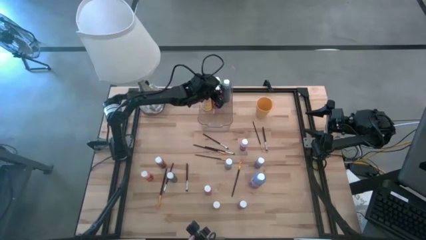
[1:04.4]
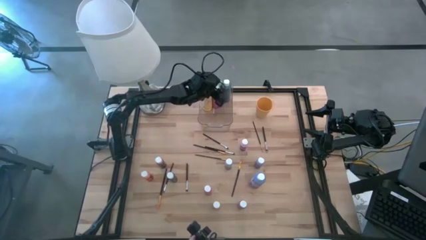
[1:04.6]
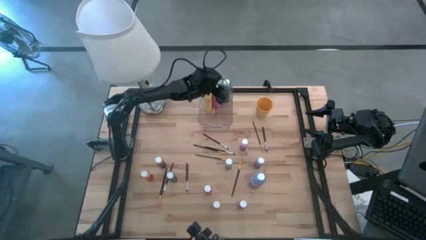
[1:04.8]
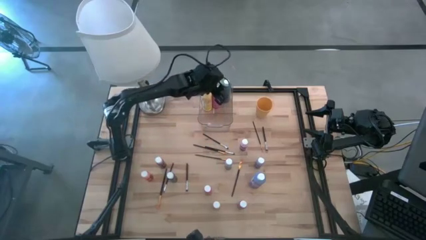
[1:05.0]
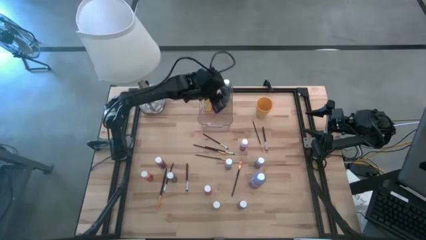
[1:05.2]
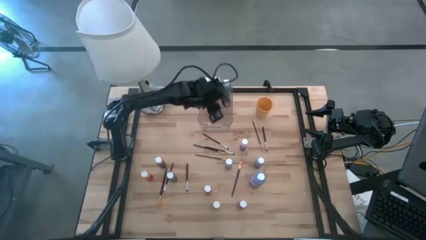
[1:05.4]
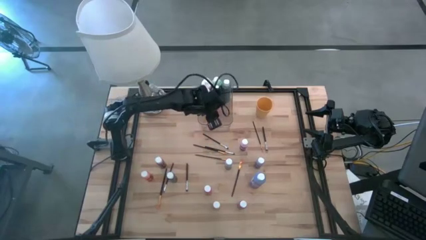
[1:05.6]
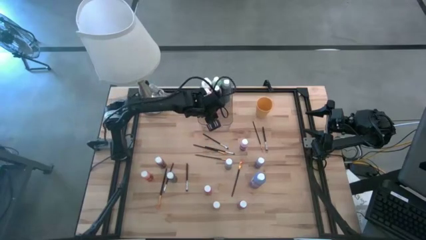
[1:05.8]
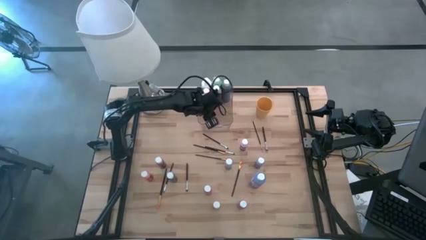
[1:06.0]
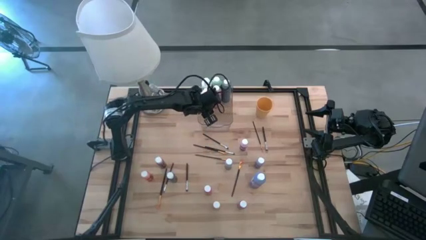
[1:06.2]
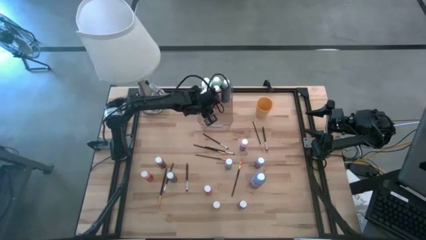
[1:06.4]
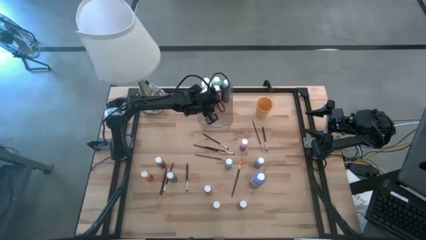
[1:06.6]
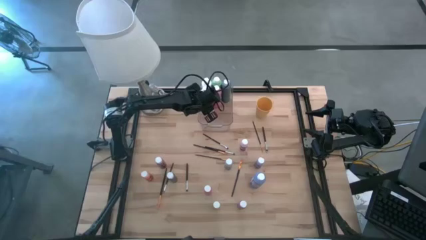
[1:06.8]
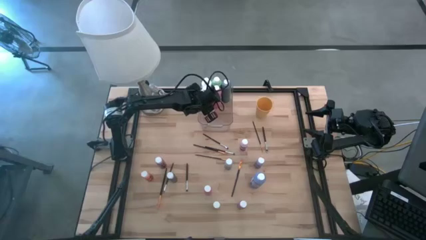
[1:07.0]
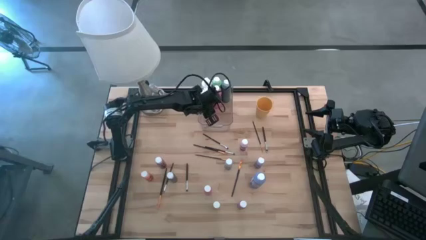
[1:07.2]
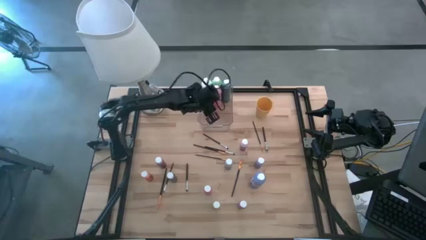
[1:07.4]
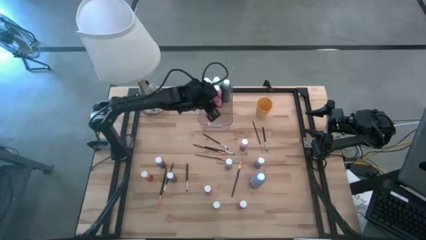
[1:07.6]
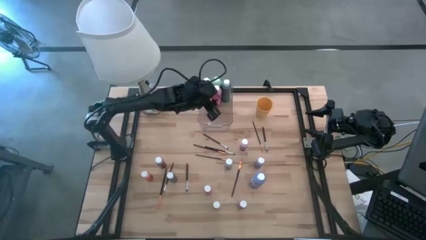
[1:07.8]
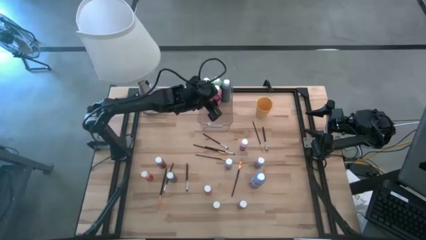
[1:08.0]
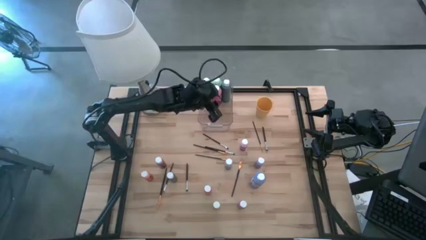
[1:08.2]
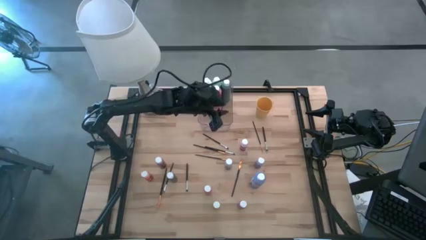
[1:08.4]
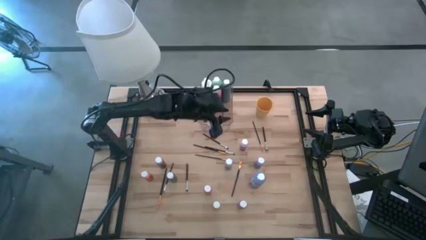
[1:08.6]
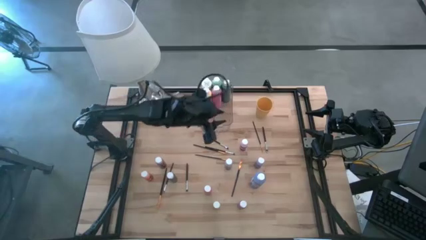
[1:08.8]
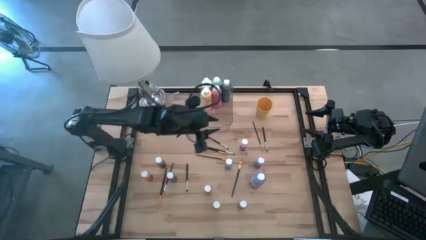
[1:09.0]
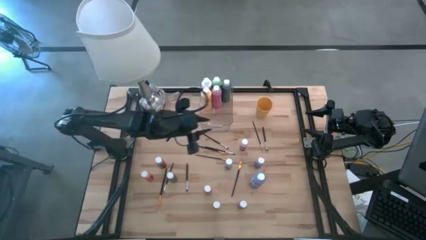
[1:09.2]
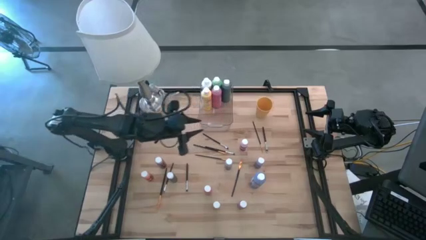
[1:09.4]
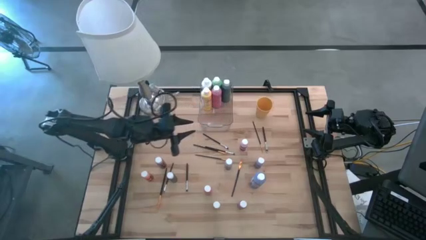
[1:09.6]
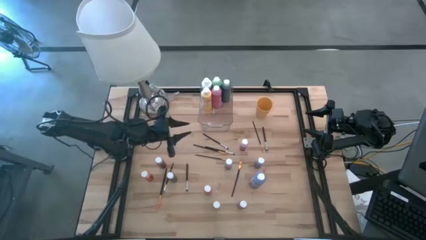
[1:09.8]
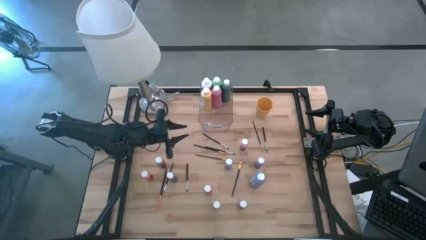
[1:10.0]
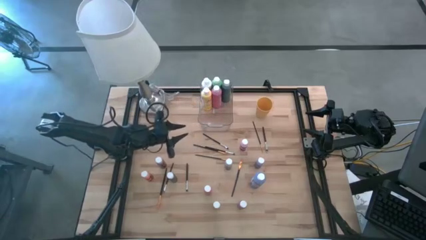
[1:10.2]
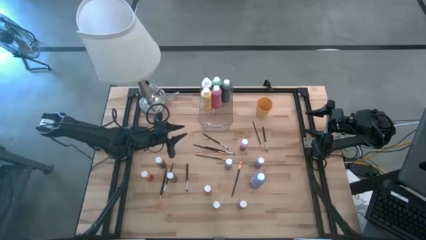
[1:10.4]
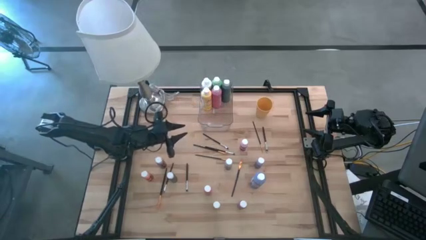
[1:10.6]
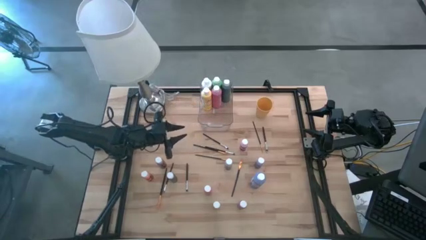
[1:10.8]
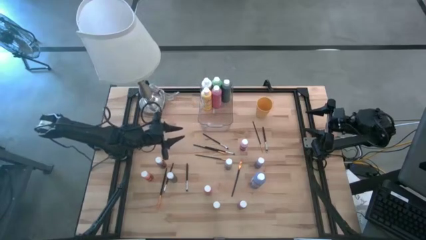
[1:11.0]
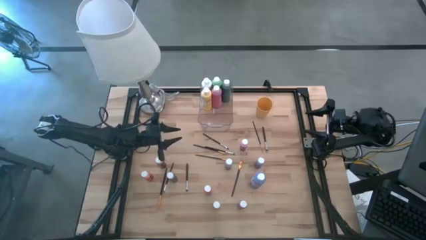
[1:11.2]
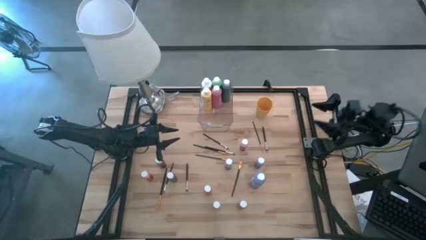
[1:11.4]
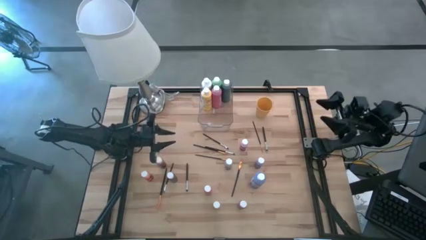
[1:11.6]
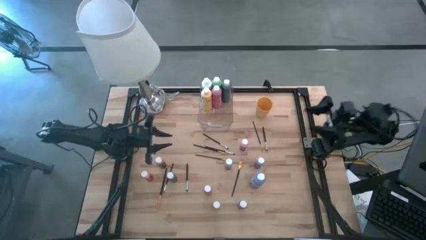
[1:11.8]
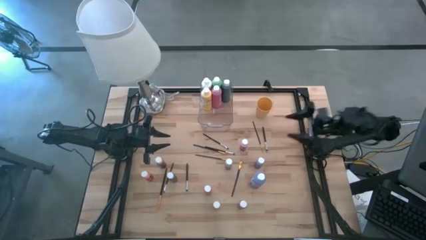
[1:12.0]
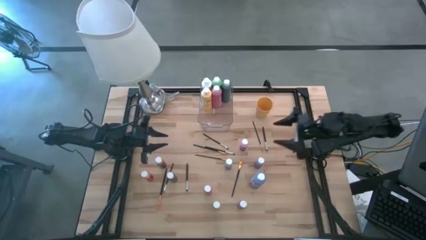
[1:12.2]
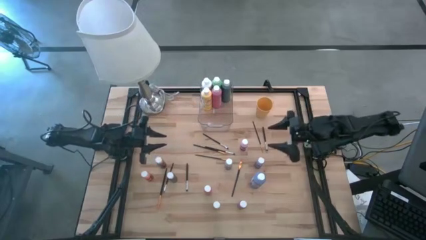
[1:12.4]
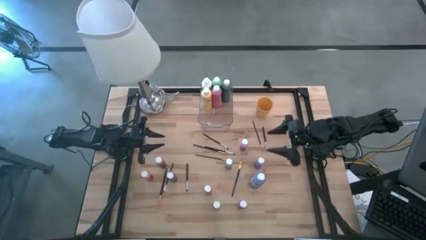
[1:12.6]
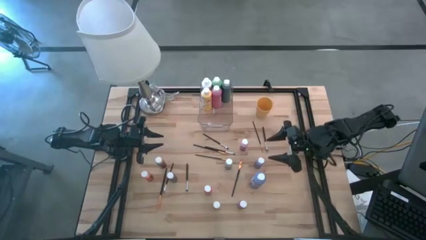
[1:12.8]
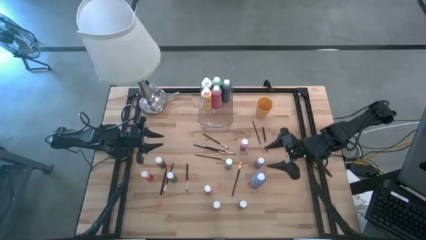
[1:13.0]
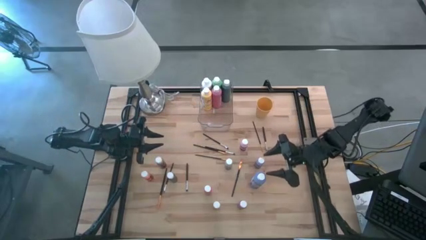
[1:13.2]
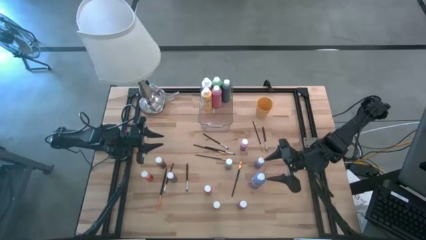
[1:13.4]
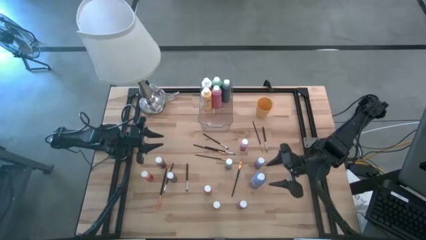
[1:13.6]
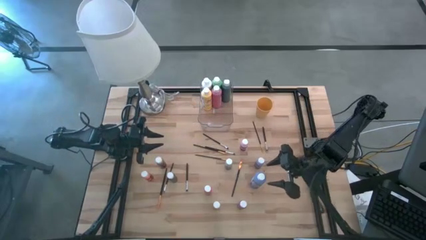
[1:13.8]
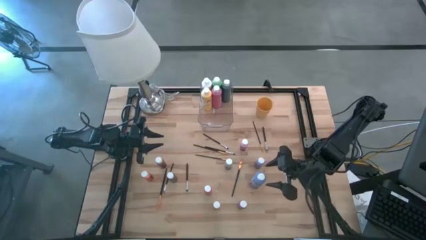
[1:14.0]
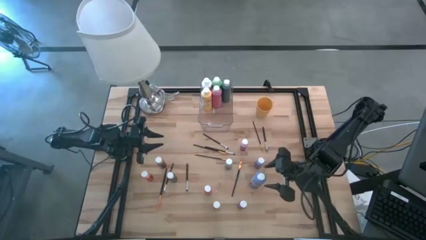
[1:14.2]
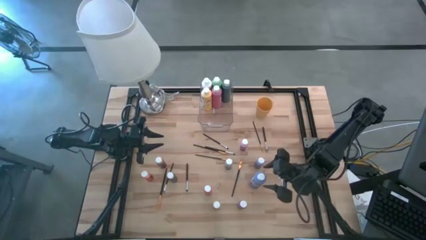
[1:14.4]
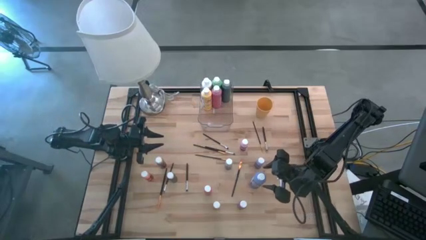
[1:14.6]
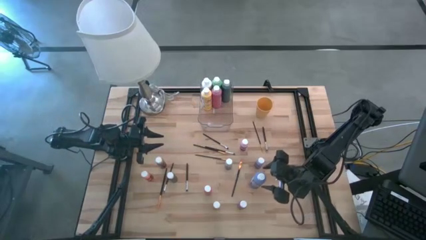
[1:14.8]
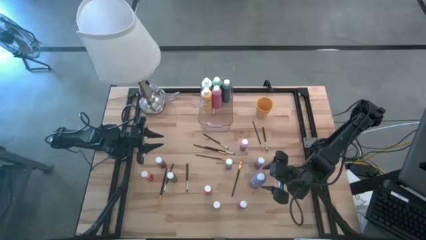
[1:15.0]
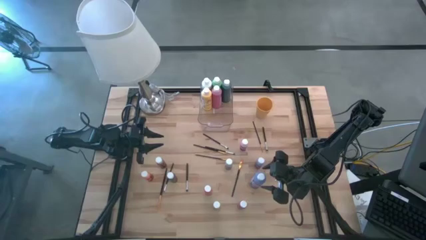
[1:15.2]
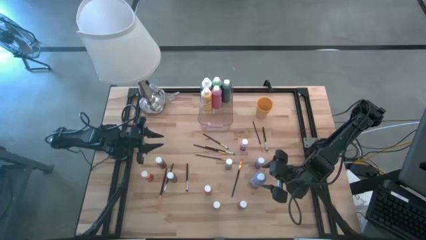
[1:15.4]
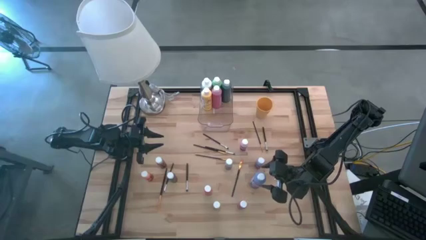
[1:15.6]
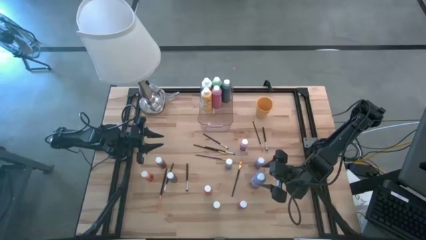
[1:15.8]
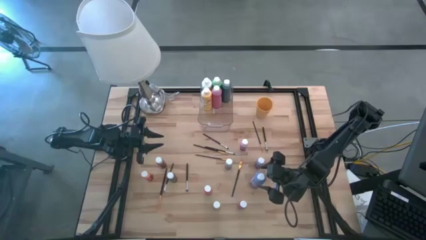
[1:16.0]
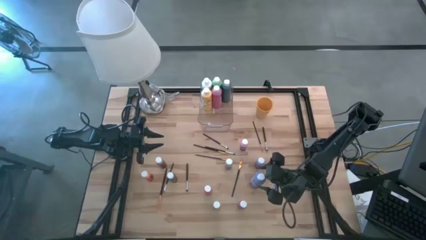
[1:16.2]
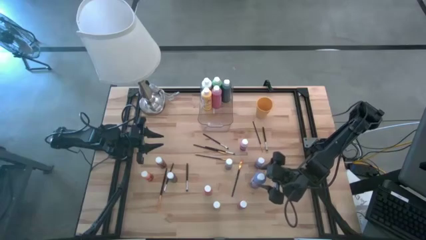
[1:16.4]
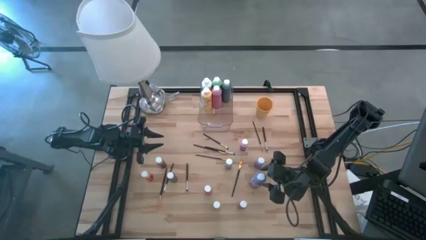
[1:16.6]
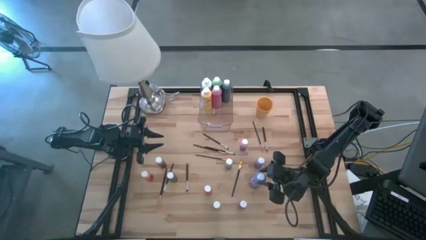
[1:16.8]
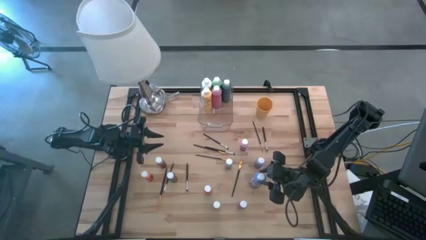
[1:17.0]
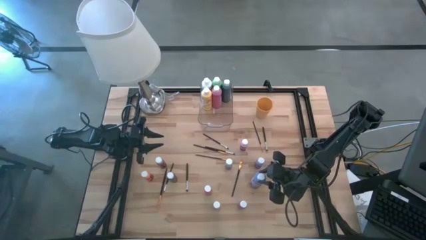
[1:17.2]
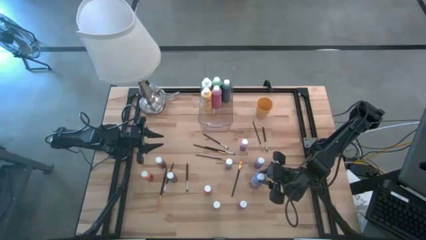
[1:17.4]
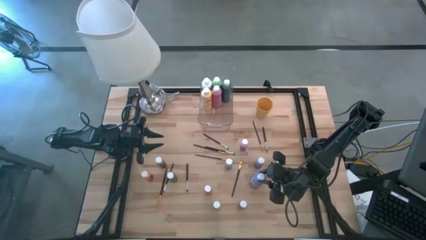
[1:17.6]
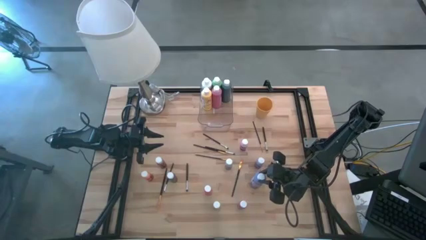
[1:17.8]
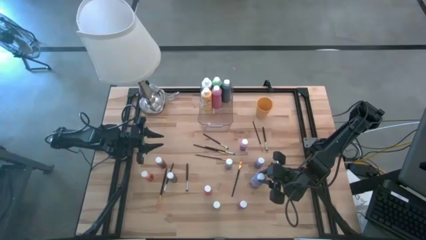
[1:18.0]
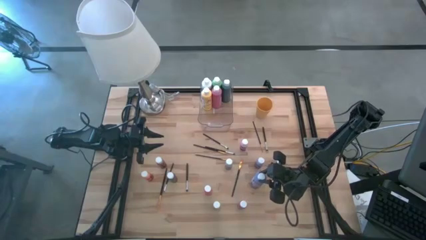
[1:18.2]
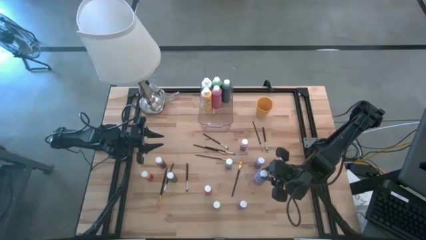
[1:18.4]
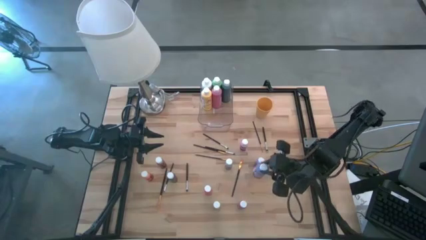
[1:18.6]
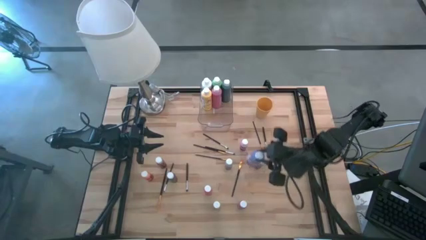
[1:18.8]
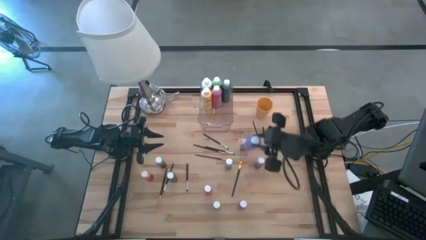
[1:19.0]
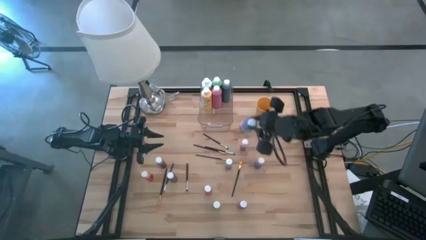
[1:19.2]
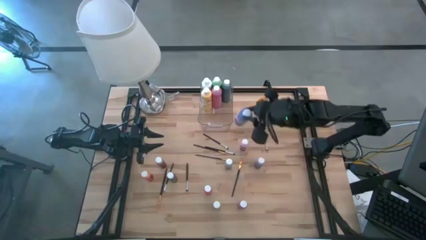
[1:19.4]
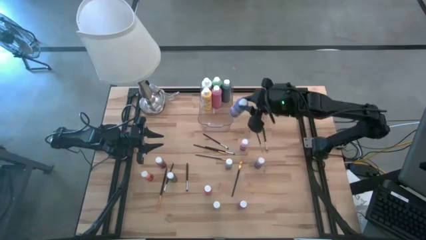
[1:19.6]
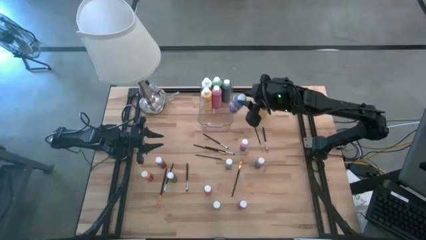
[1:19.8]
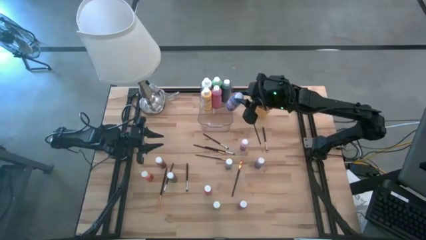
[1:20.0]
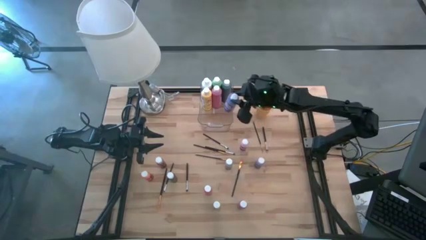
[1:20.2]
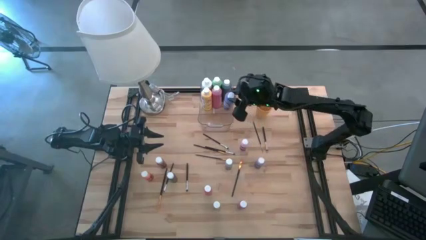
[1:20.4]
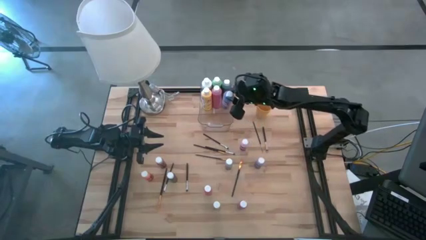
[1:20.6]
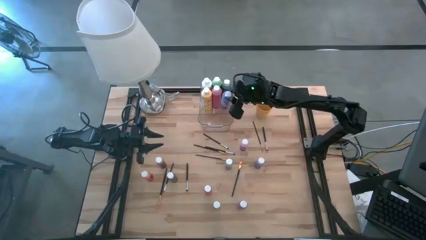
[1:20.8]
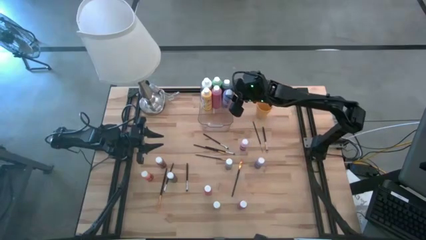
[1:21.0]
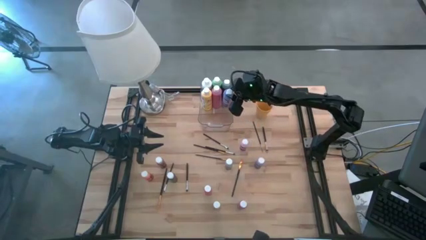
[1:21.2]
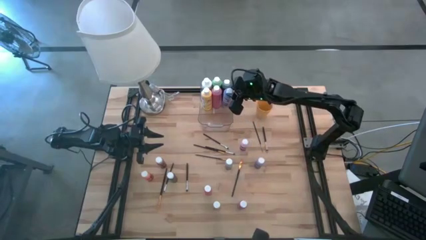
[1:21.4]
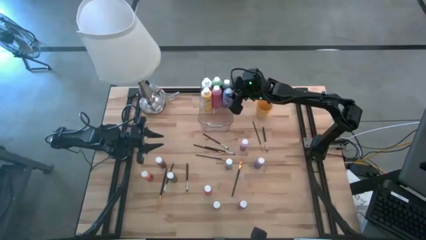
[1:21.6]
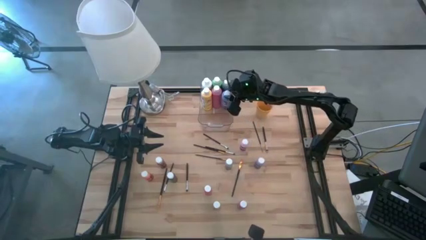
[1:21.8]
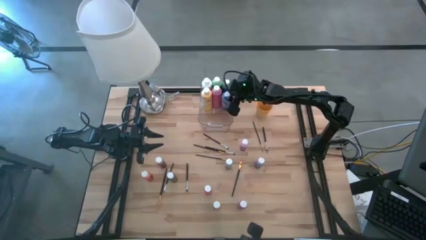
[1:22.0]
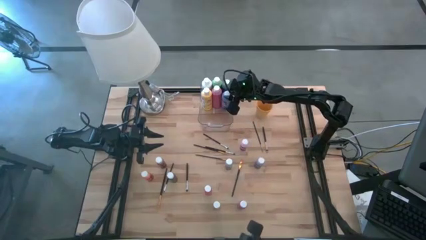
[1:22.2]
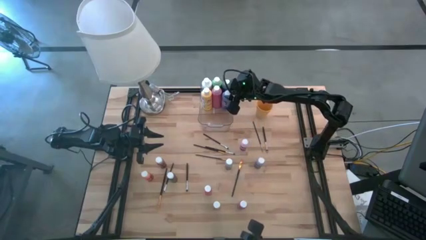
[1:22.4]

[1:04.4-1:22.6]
Task: Pick & Place Paint Supplies
Put the big blue paint bottle into the bin
